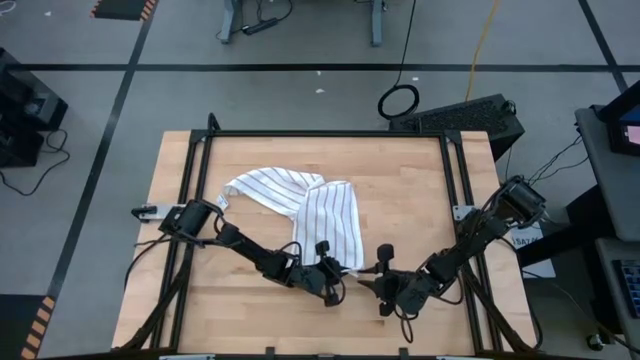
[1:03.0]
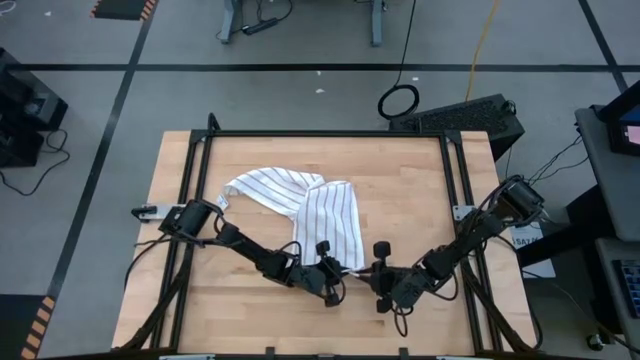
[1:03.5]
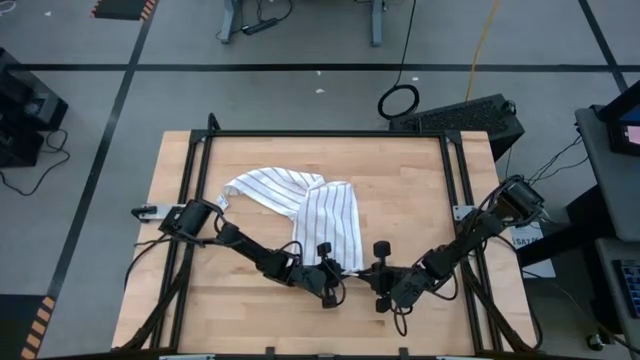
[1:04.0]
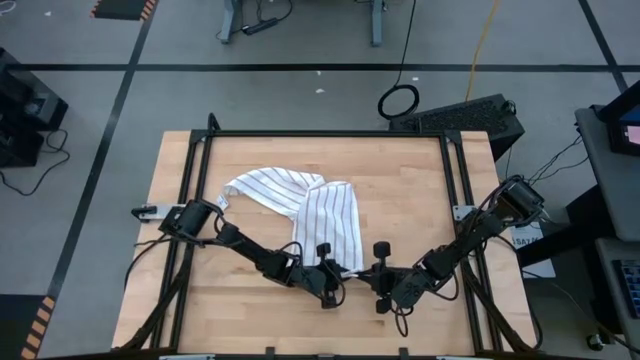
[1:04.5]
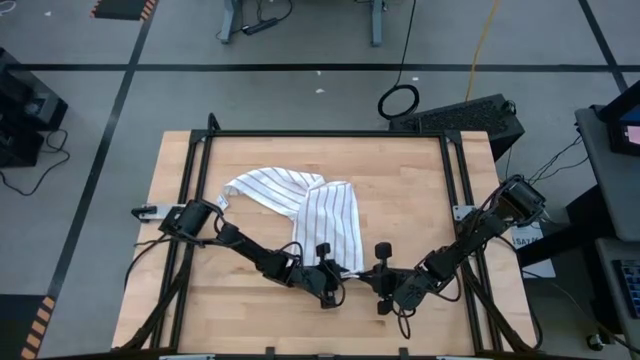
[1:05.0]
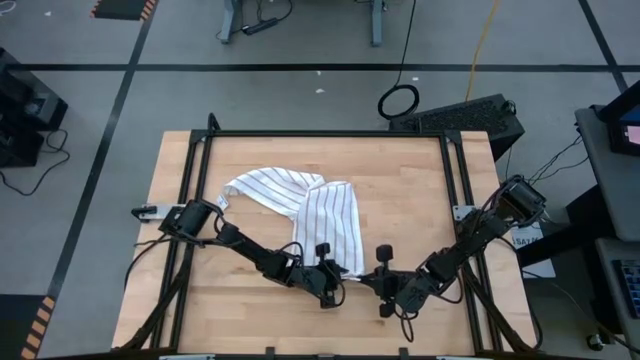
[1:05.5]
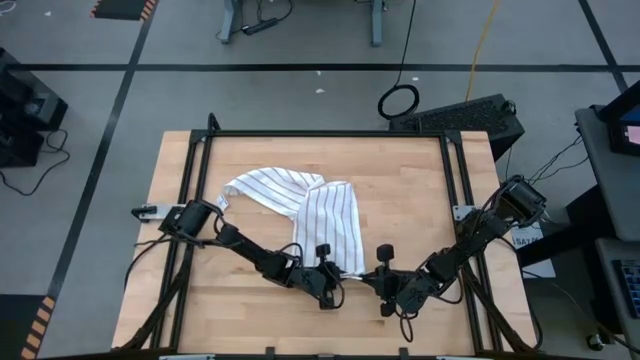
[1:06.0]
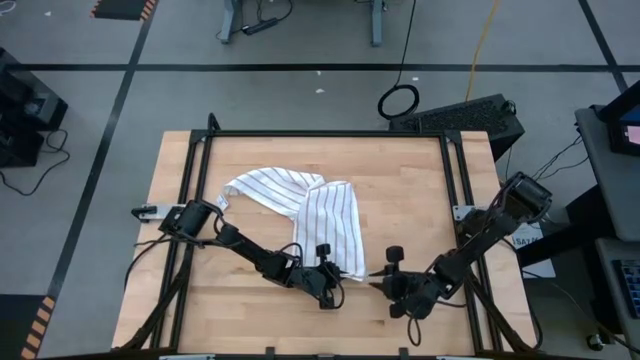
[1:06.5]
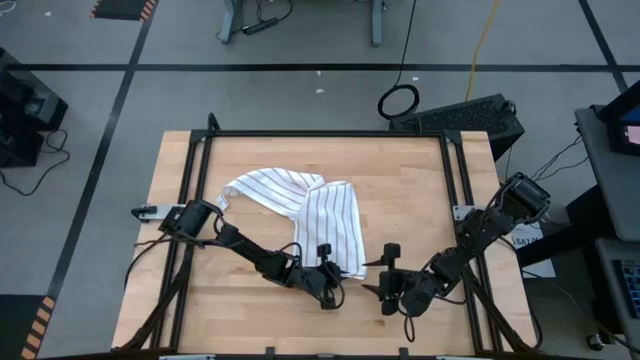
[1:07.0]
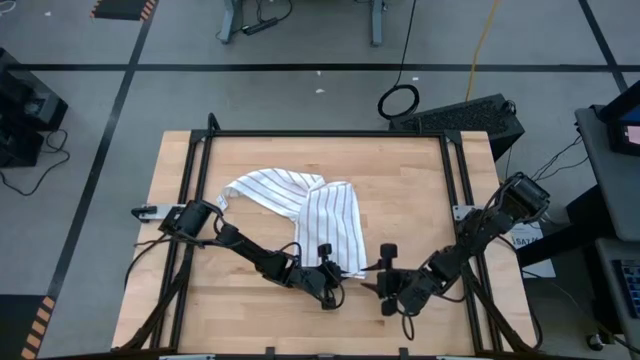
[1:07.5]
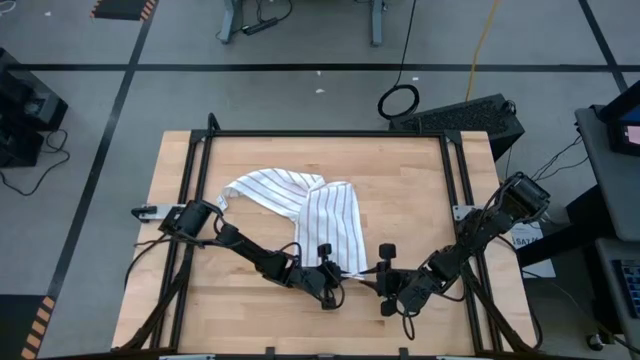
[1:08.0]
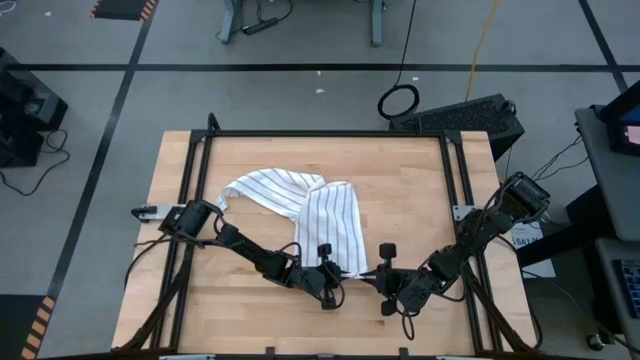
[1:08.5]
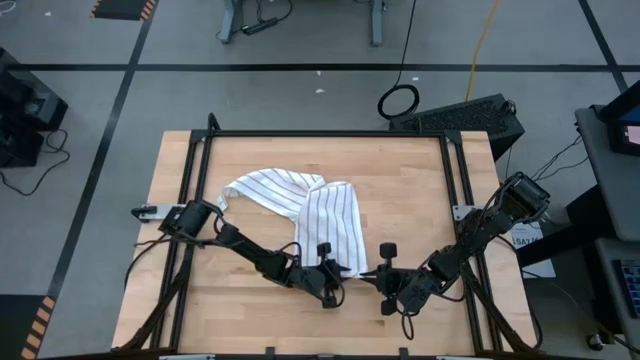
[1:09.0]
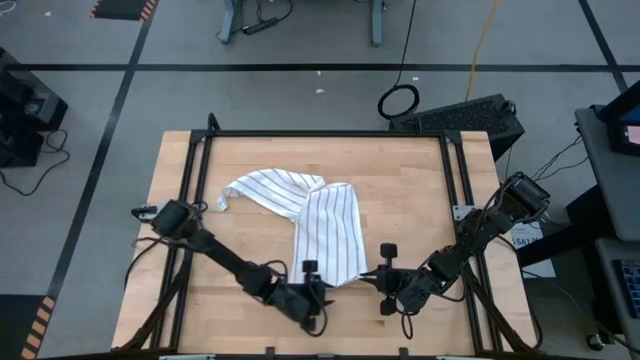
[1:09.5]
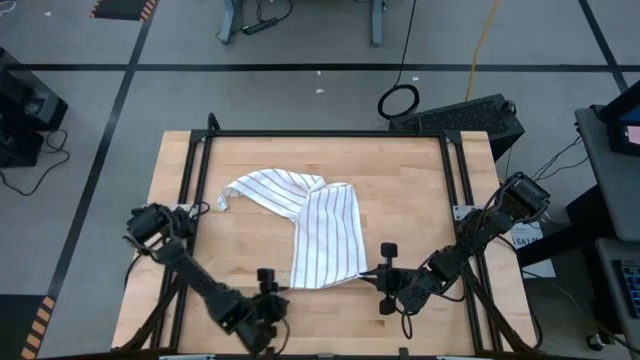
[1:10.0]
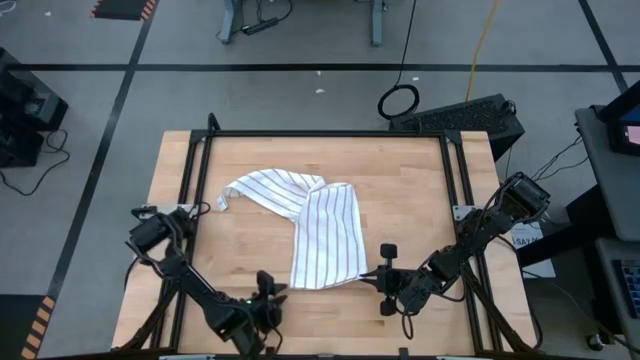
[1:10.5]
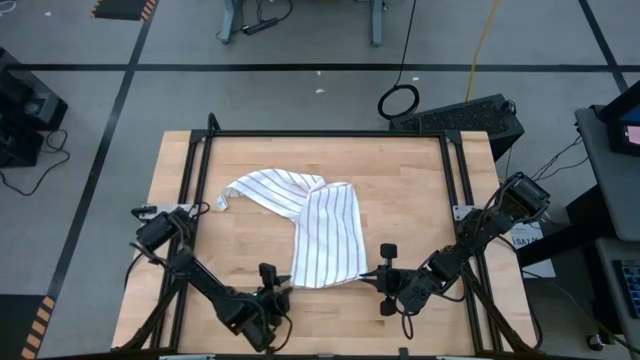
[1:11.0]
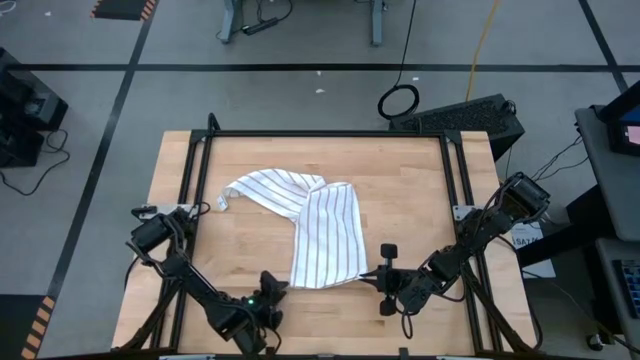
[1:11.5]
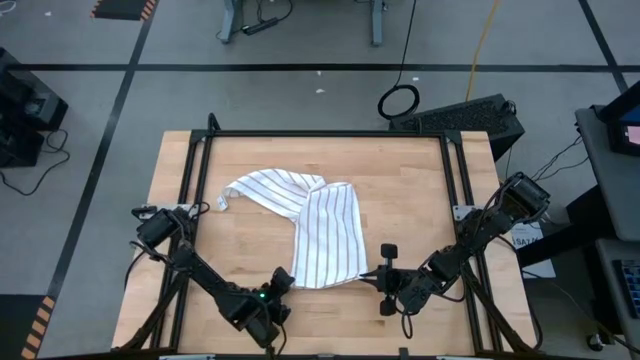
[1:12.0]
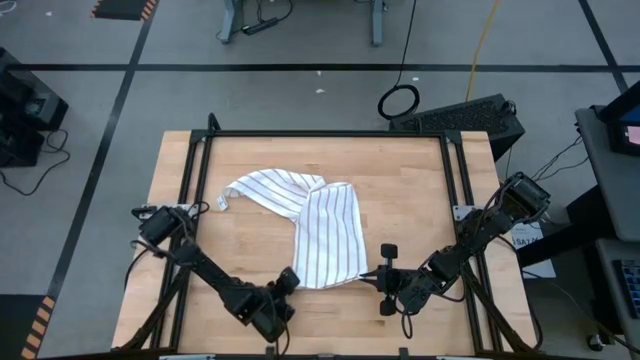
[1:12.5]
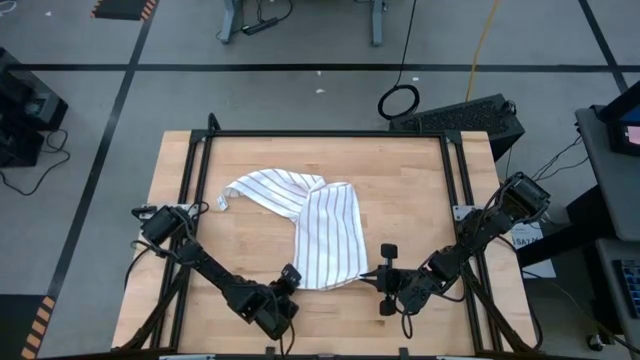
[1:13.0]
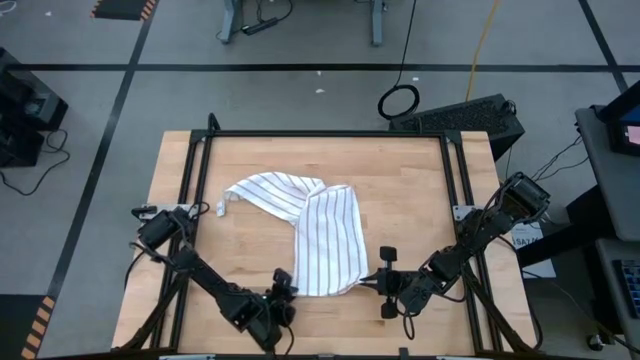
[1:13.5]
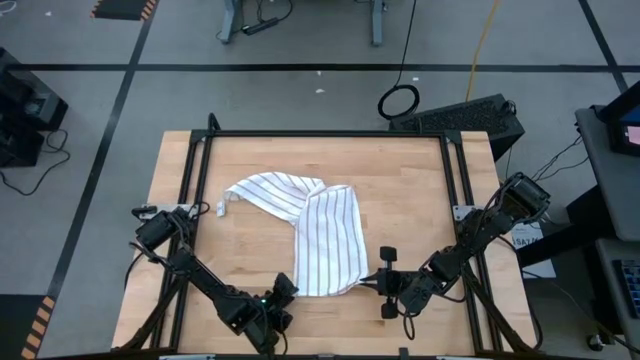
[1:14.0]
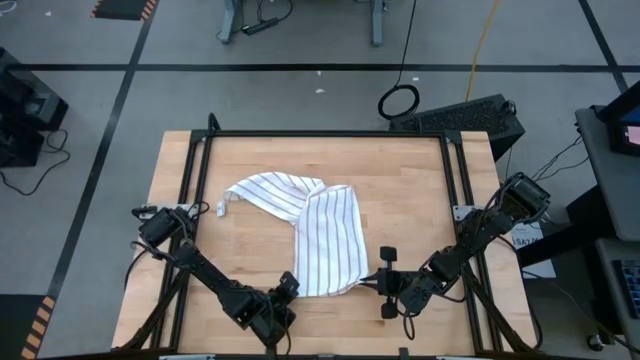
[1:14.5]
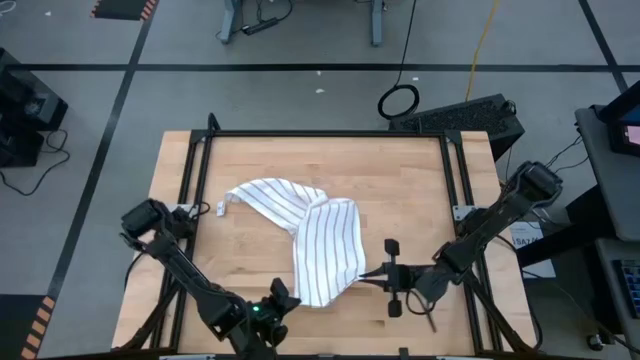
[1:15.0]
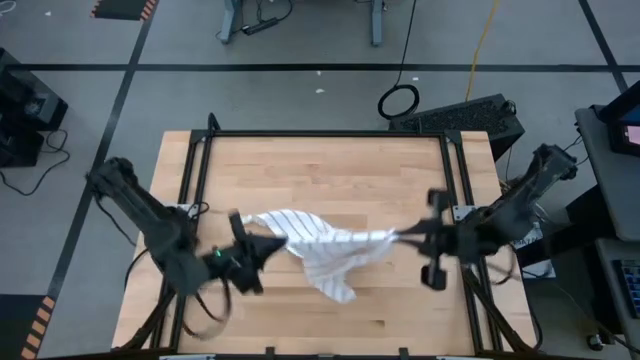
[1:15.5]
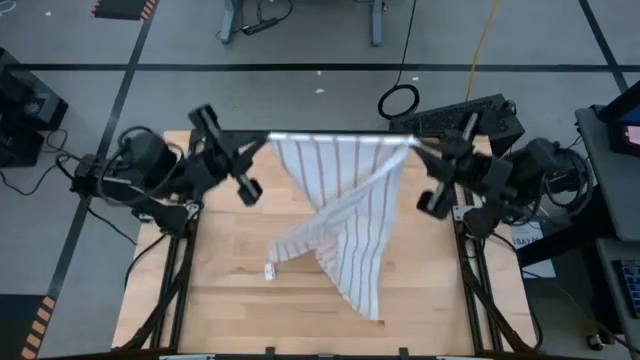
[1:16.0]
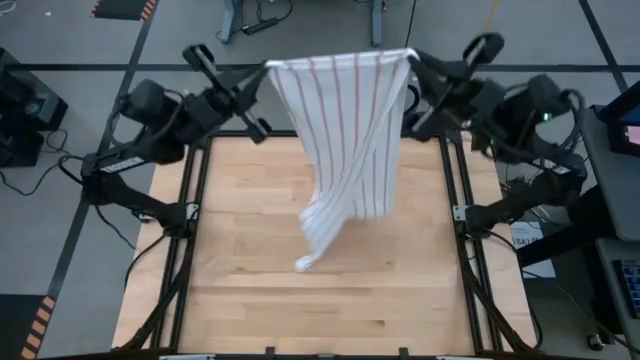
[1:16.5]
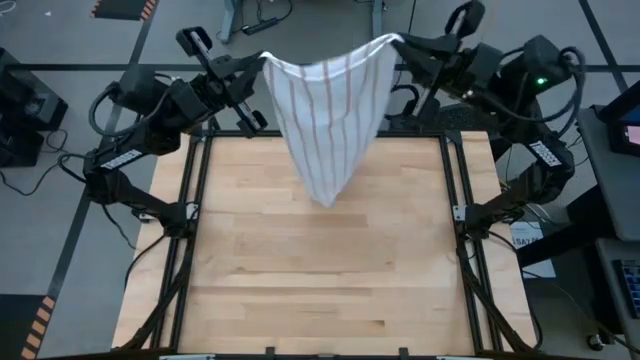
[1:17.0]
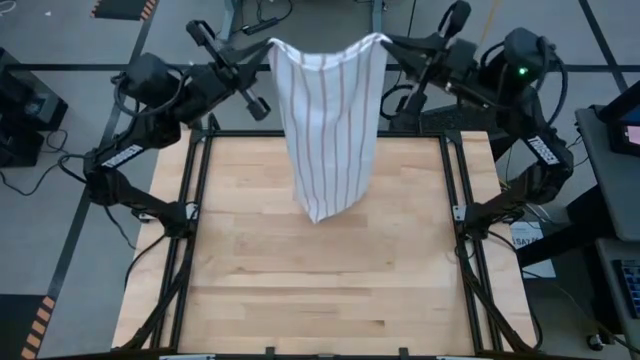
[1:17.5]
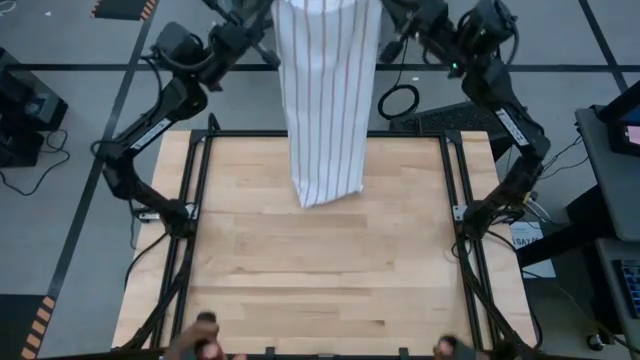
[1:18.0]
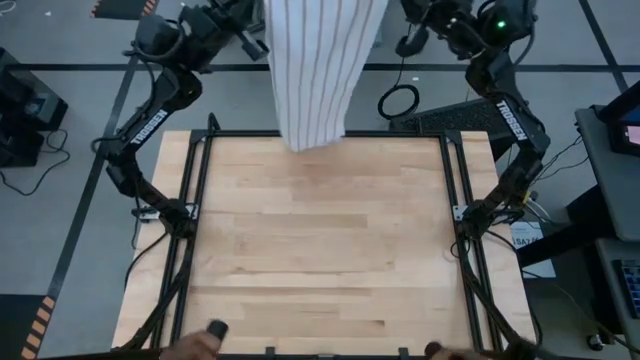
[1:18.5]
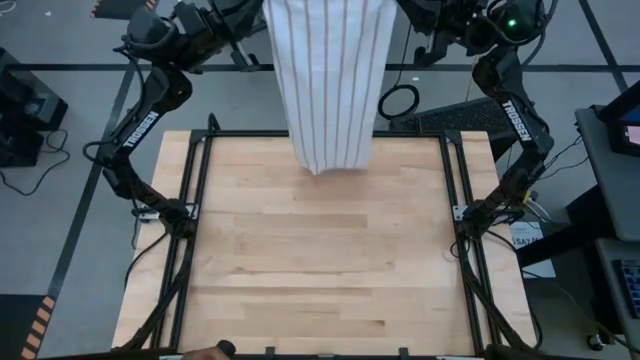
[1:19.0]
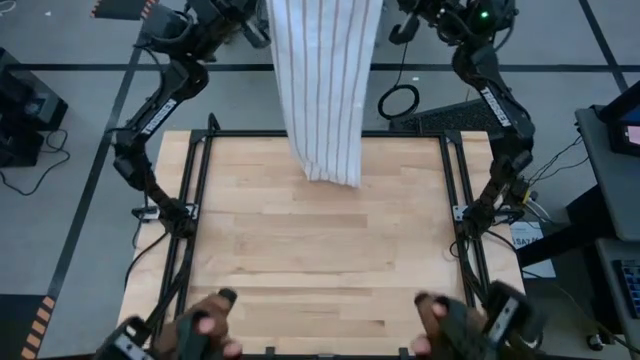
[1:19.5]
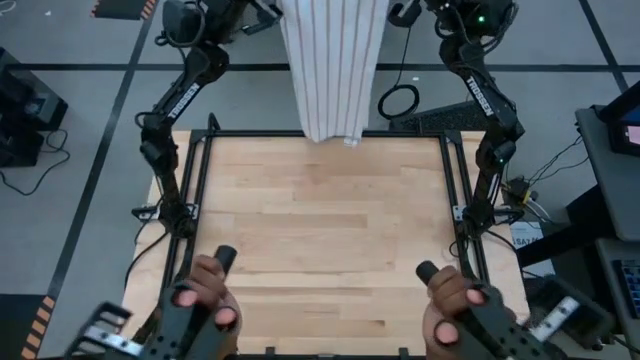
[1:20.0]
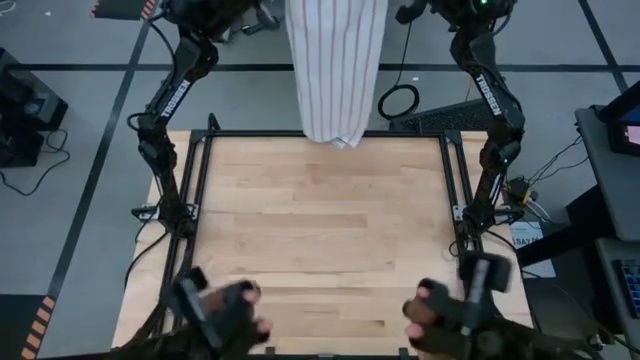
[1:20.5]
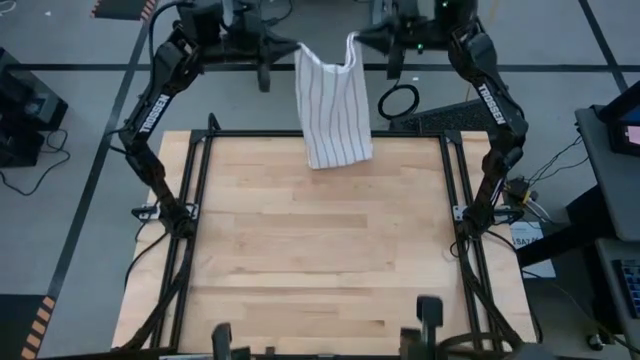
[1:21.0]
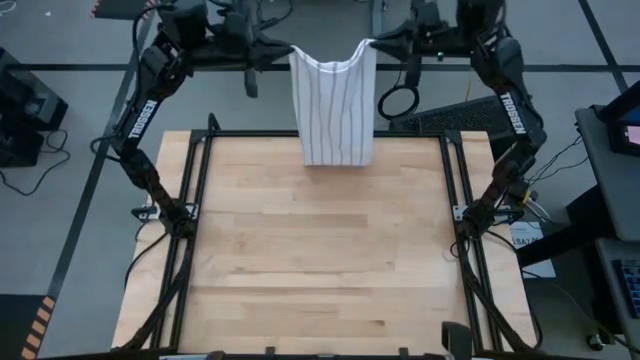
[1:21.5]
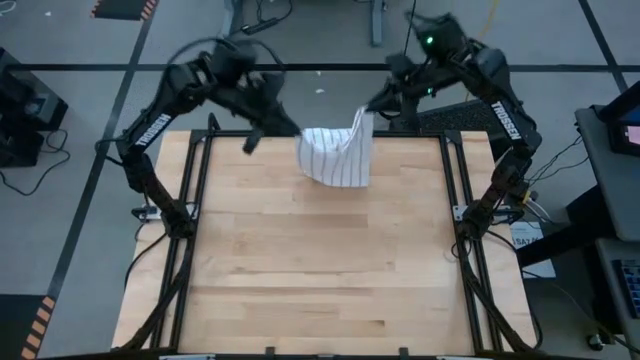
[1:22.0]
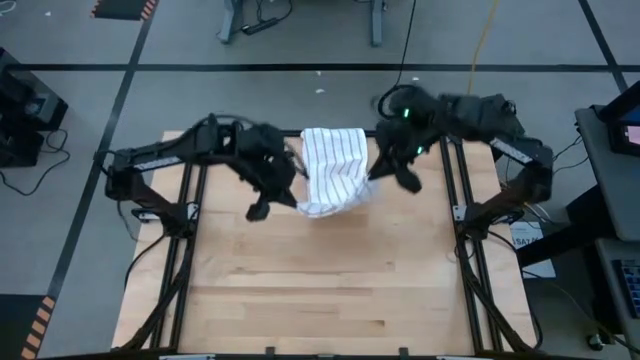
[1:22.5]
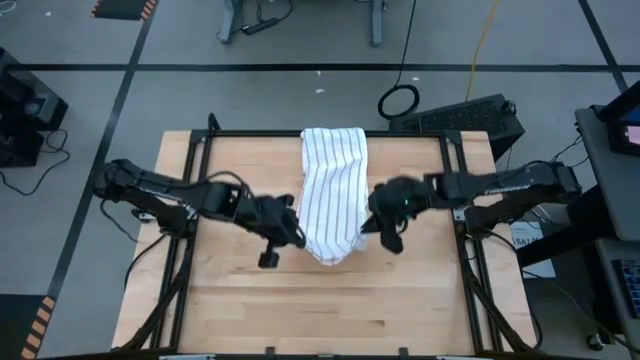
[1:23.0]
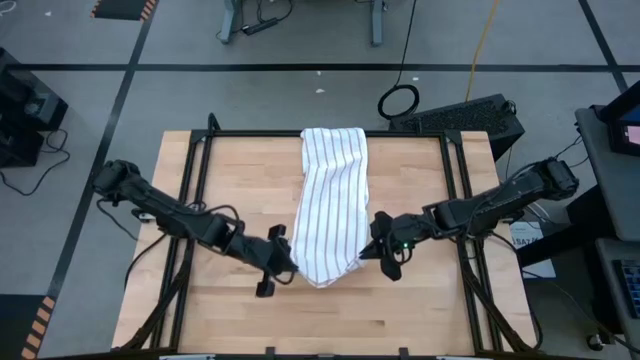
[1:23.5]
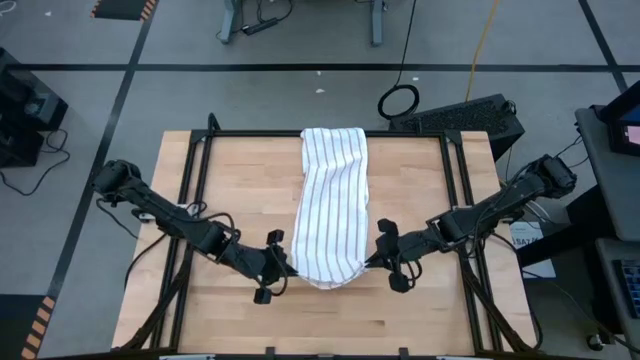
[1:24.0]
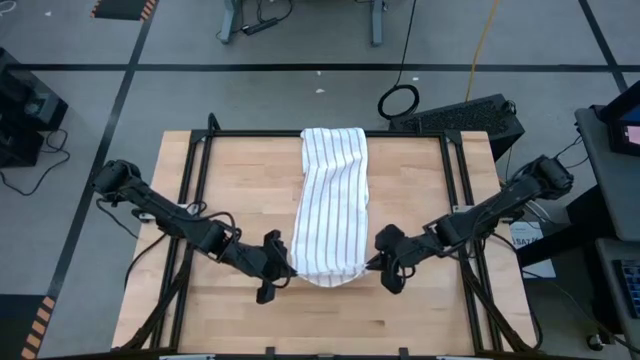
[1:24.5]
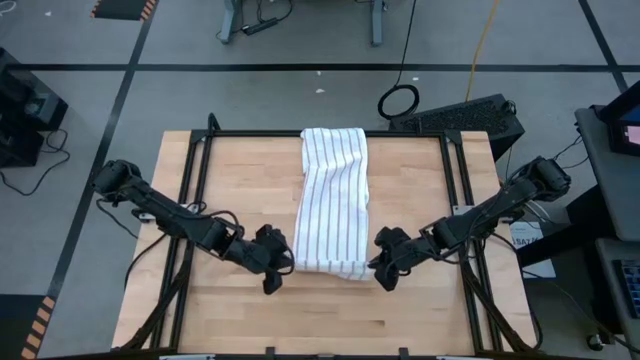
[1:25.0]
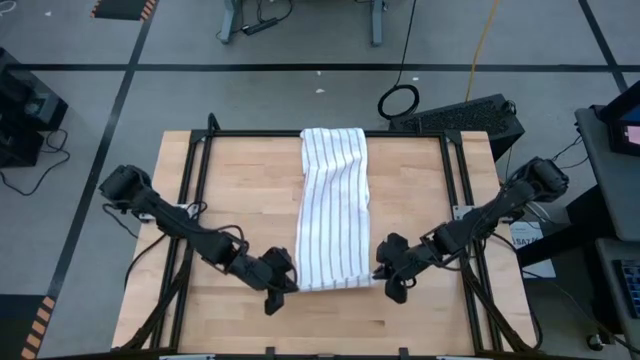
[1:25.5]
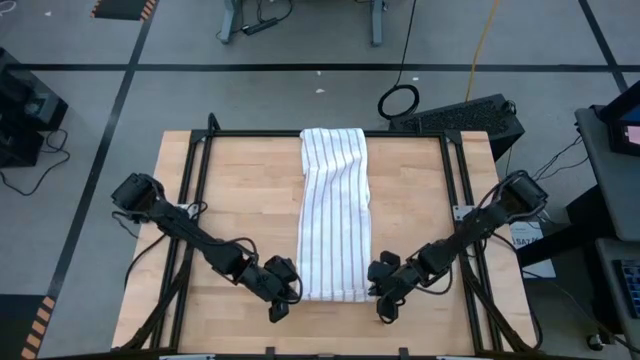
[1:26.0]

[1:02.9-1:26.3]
Task: Roll towel into tight, uniform cylinder
Fold the white brown kitchen towel
